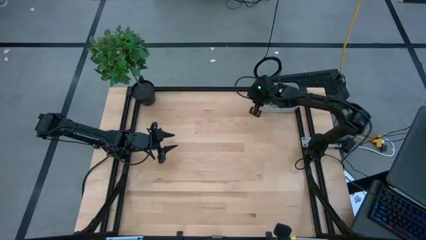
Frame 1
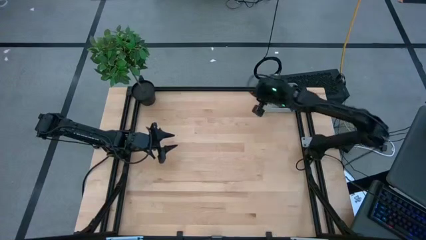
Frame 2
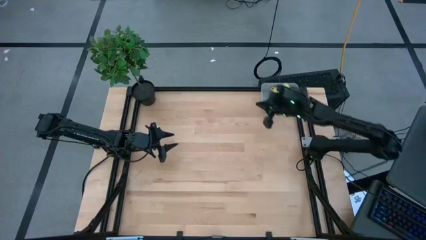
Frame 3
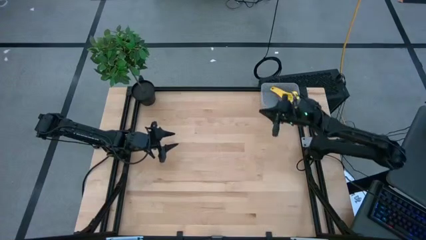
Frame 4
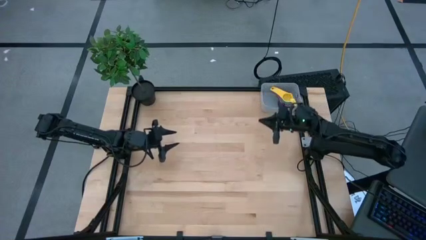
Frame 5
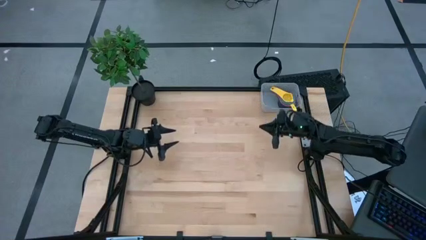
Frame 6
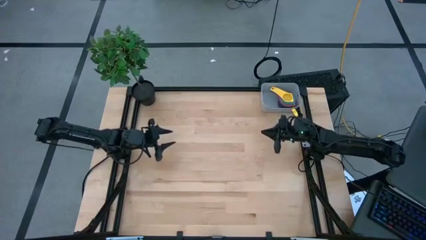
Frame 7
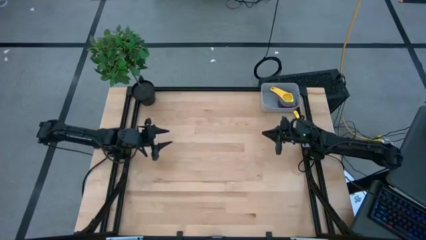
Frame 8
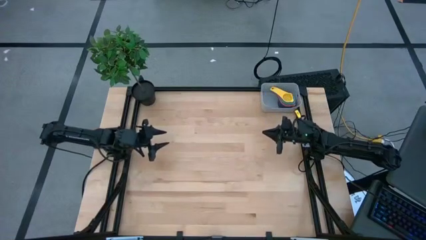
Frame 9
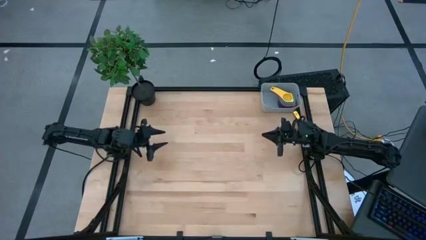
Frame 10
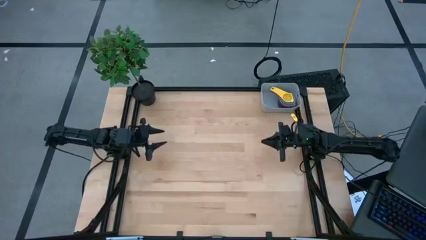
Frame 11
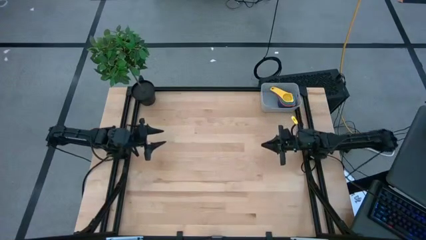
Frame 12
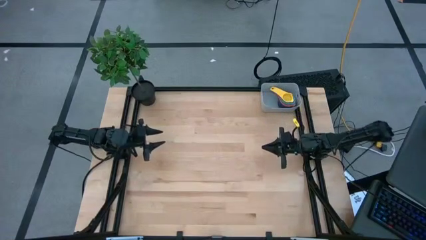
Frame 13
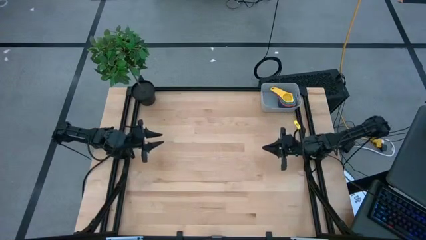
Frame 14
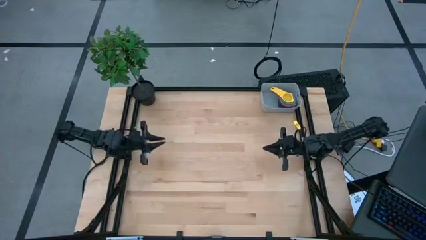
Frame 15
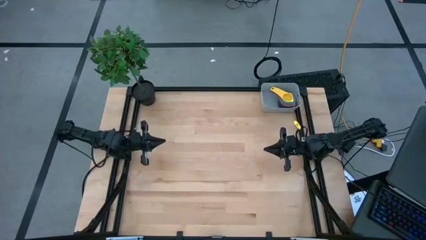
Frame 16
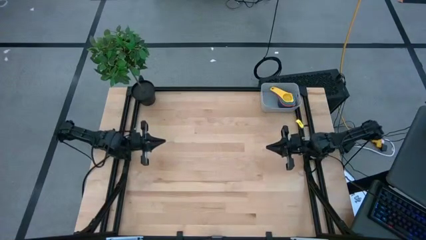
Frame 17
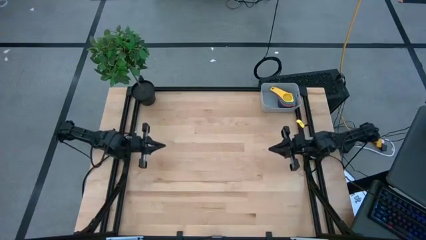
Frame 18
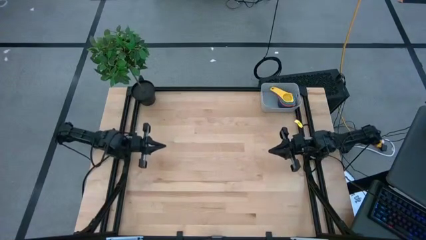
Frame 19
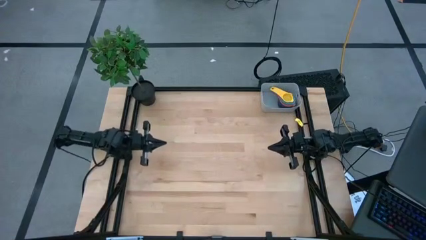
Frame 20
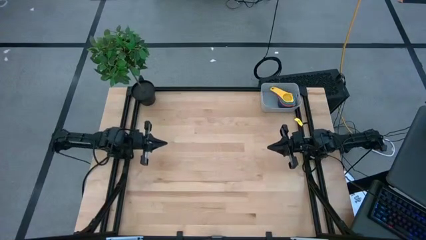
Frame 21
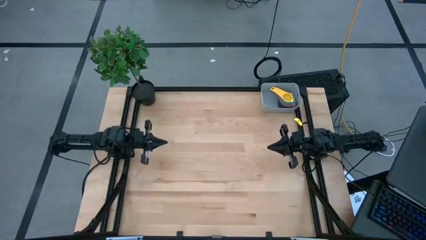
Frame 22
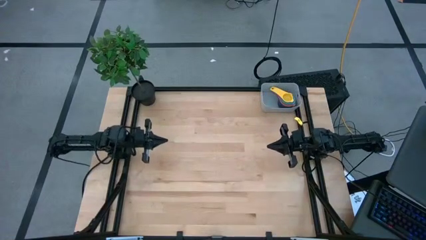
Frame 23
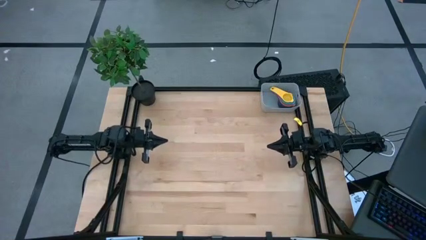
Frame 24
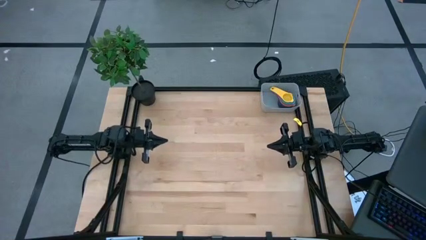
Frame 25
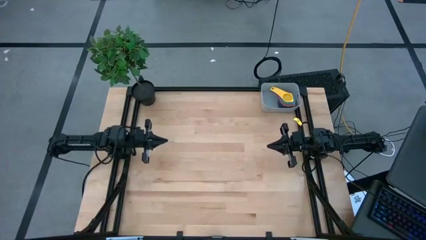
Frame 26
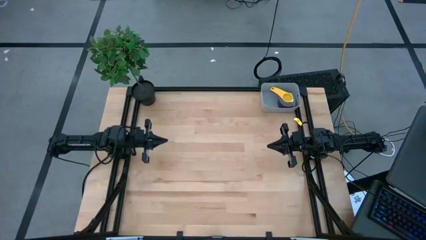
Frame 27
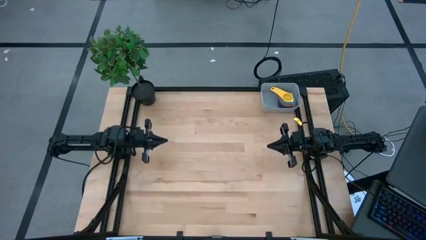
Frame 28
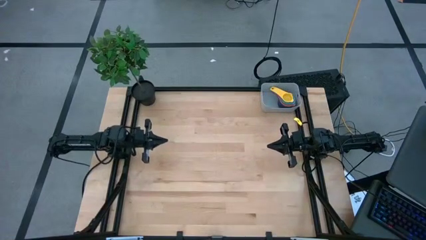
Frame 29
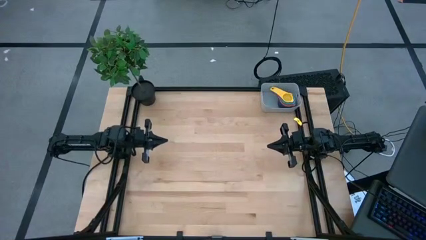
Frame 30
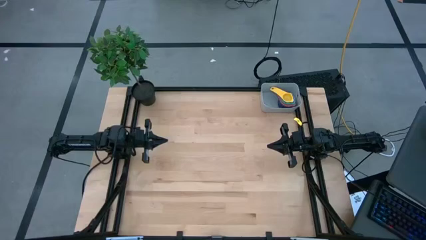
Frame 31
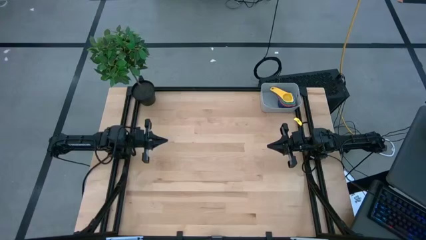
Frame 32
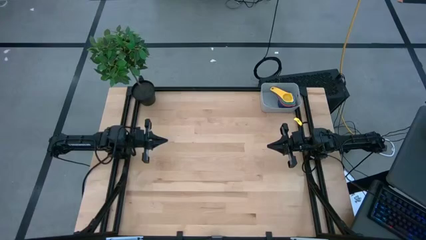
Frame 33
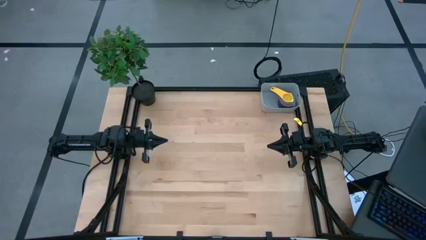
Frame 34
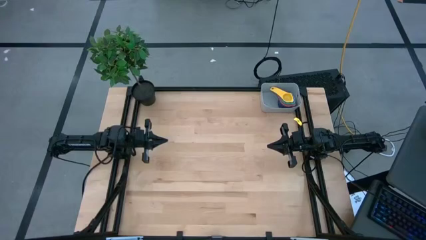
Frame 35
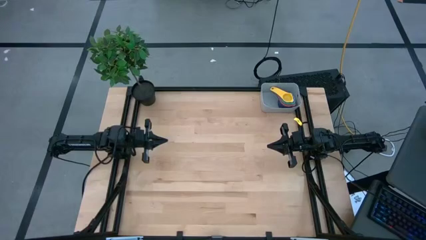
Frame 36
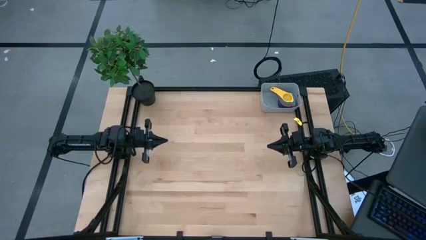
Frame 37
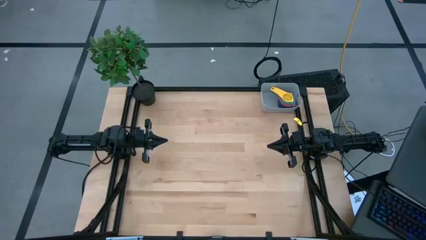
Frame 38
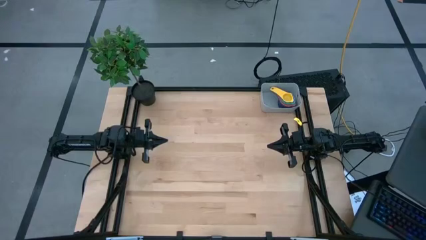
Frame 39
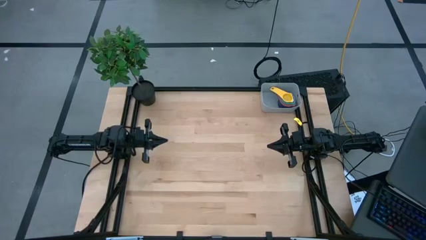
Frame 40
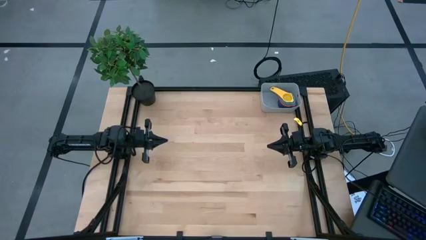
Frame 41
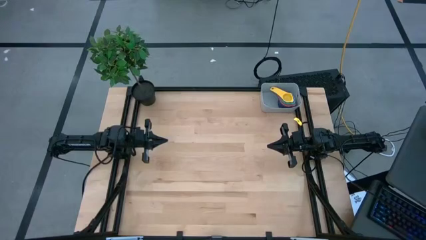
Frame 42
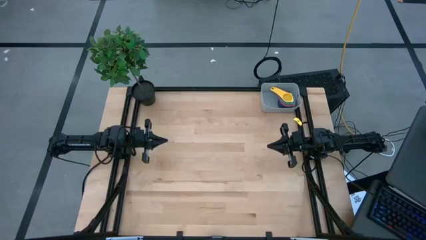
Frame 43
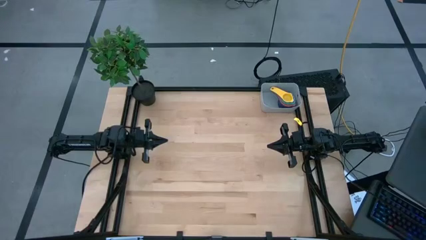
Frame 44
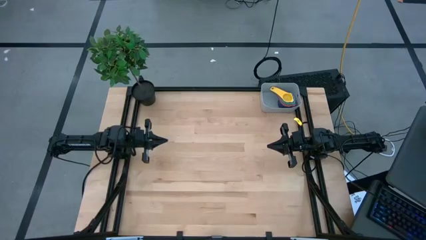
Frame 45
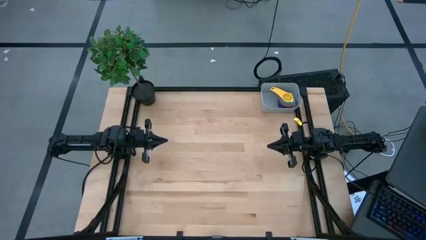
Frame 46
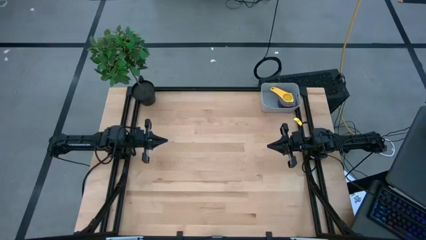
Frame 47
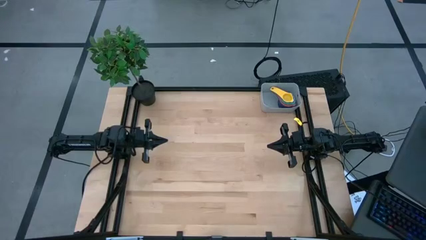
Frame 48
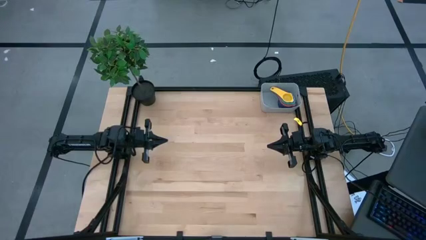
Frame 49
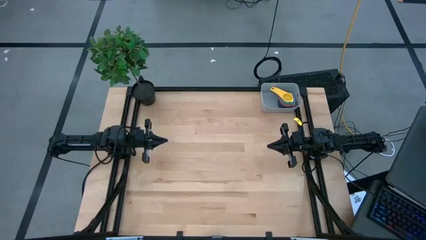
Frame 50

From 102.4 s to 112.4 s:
Task: Nest measuring cups in basket
Return to Home Position

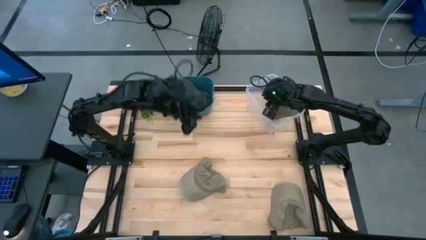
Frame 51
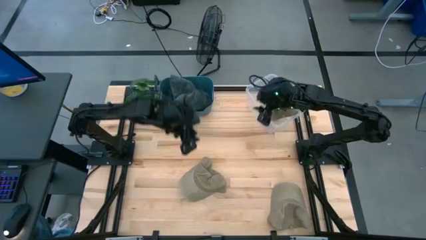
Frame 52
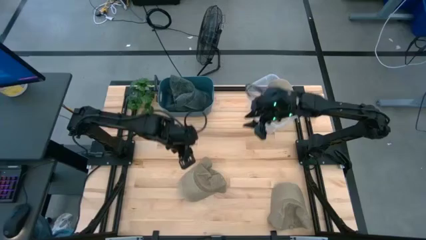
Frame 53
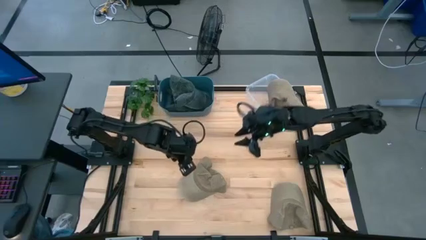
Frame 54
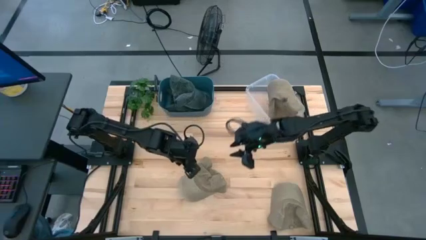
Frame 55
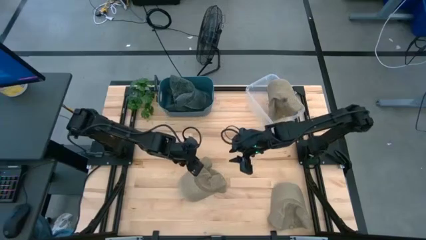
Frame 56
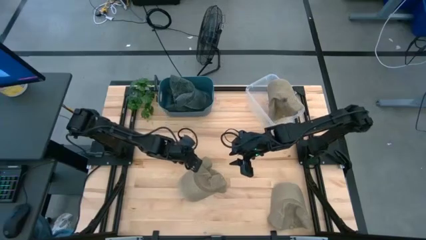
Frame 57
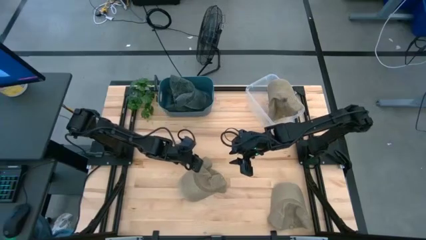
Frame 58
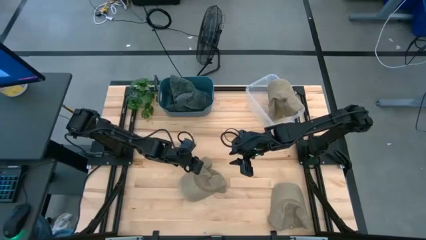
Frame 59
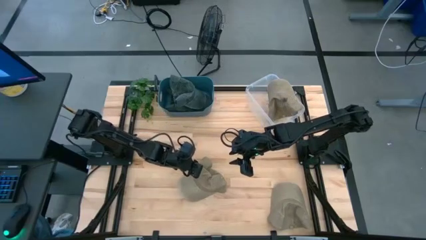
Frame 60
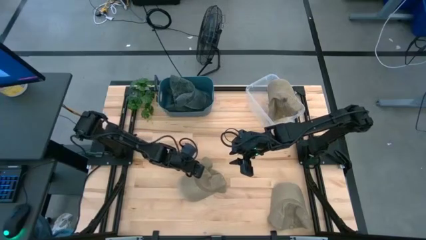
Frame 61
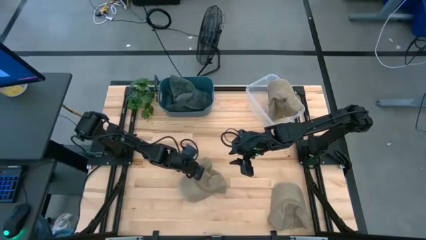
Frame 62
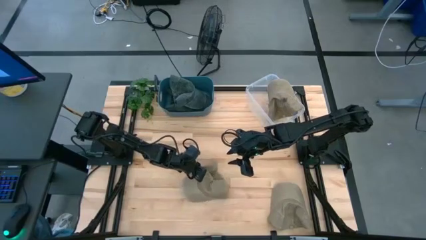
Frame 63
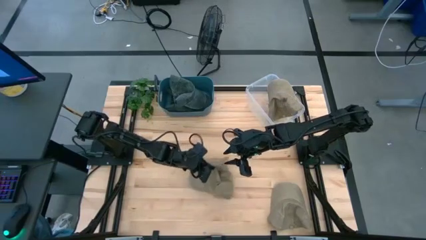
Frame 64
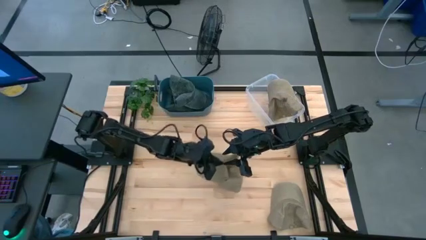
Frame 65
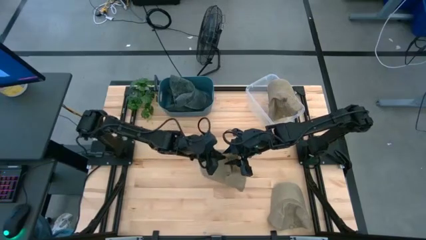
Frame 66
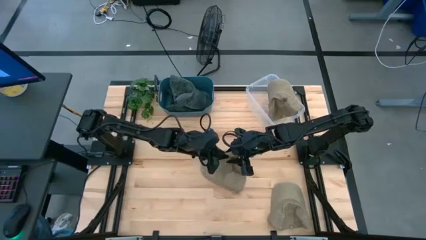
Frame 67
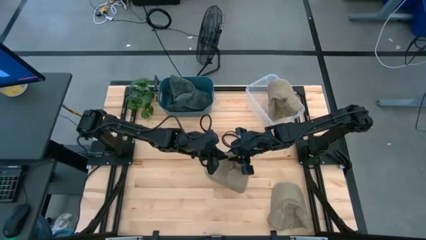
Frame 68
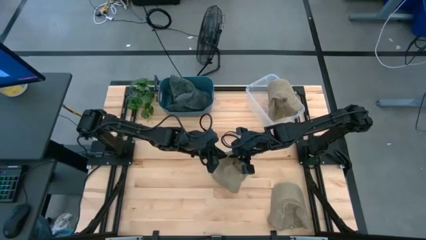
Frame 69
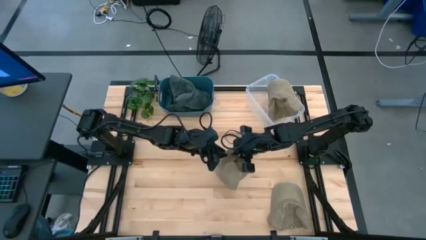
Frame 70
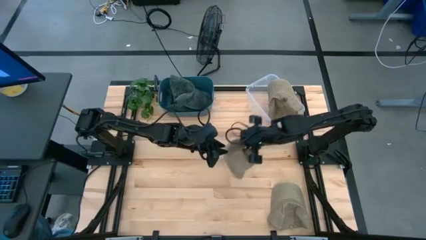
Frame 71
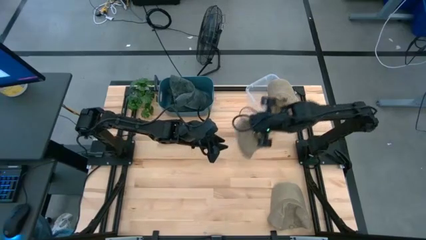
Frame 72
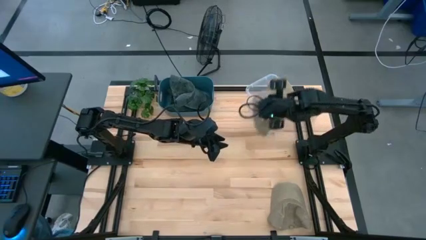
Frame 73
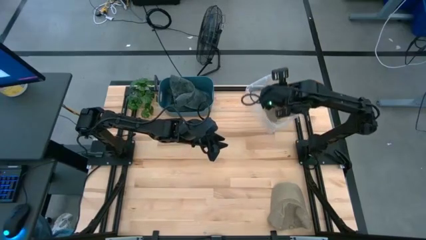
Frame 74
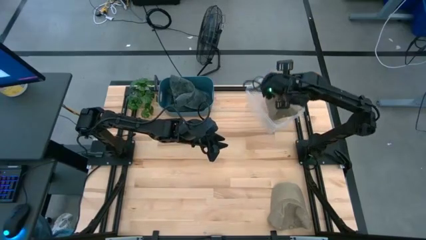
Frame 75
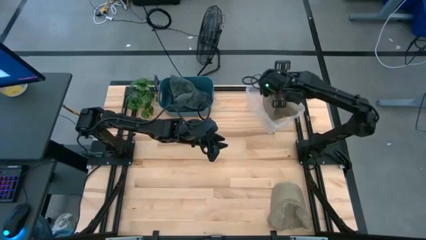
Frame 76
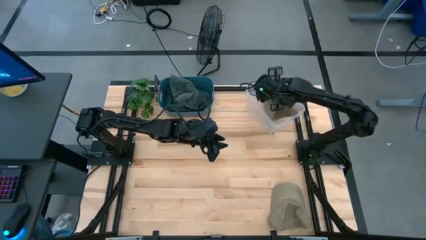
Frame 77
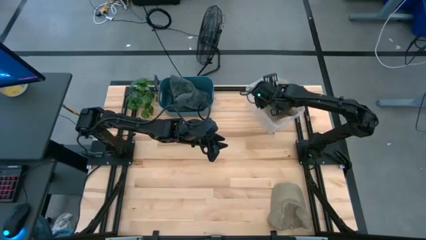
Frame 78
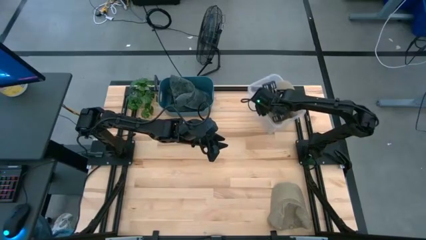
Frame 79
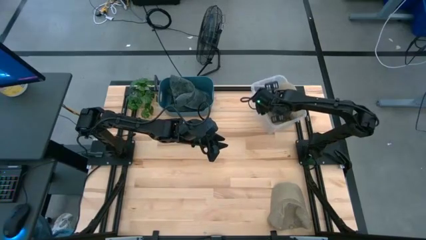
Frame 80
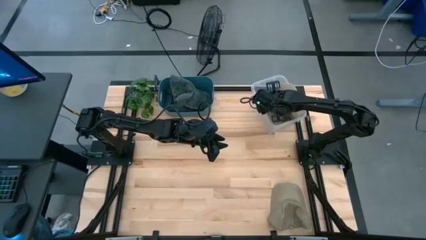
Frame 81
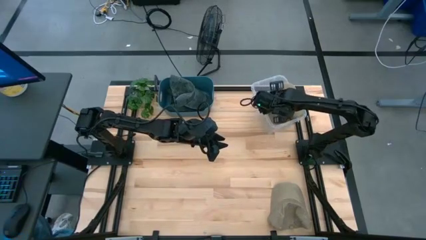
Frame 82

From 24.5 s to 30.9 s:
Task: Pick & Place hat
Put the left brown cap into the transparent bin
